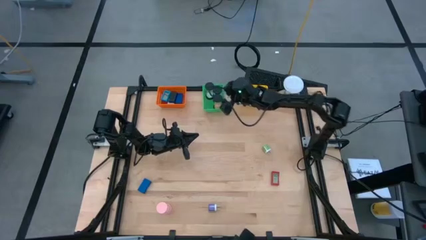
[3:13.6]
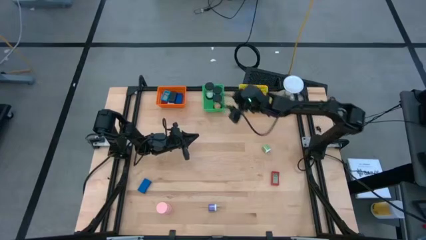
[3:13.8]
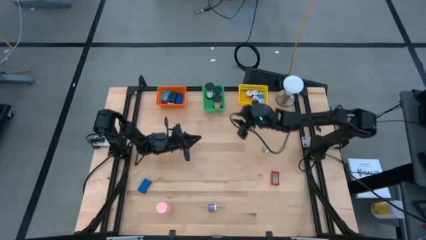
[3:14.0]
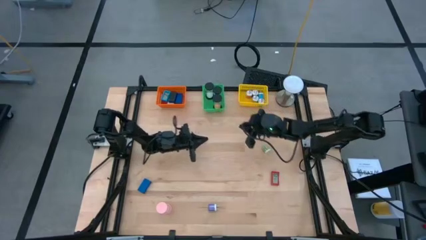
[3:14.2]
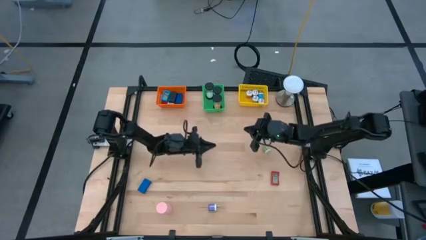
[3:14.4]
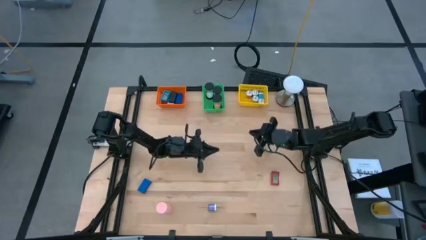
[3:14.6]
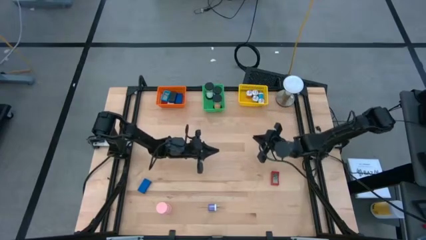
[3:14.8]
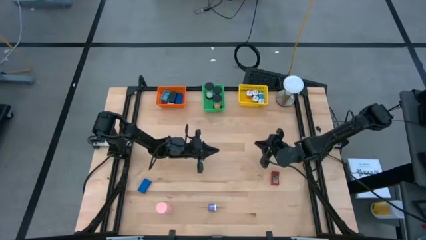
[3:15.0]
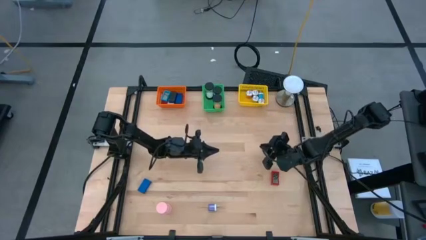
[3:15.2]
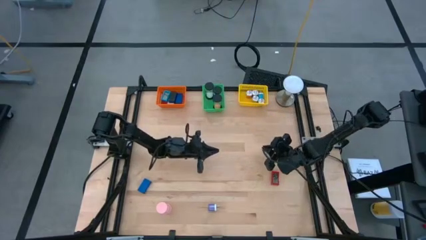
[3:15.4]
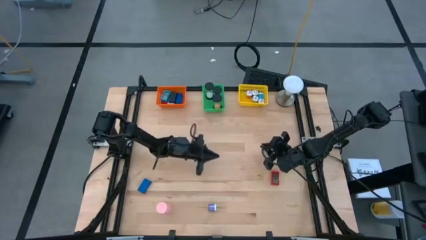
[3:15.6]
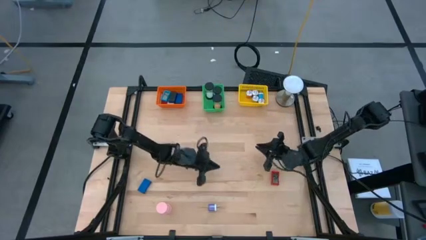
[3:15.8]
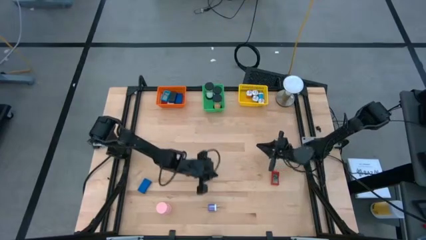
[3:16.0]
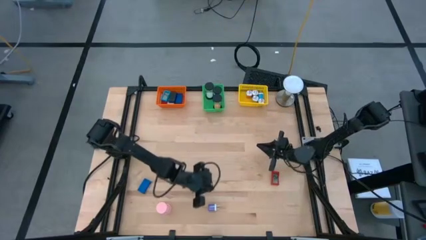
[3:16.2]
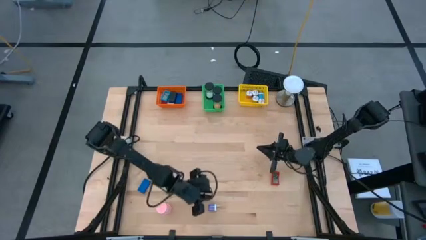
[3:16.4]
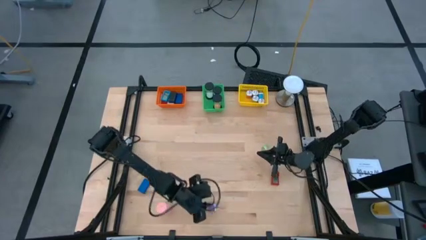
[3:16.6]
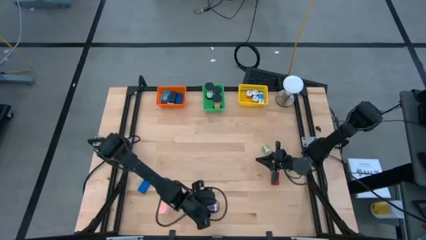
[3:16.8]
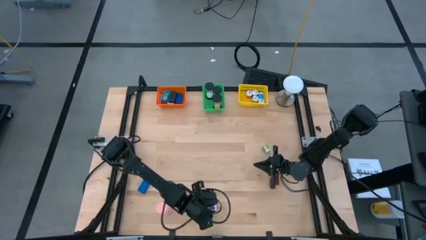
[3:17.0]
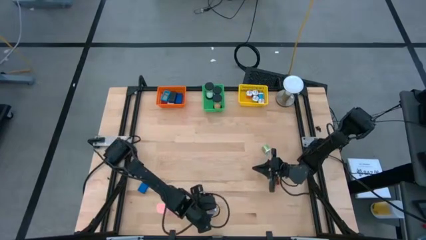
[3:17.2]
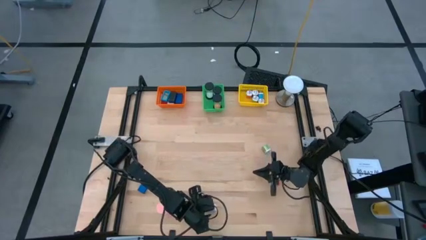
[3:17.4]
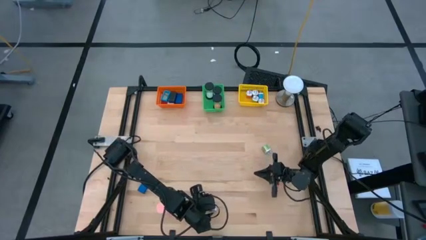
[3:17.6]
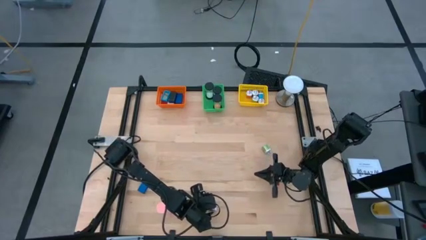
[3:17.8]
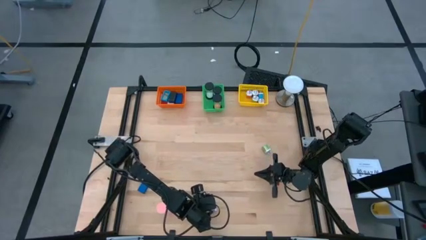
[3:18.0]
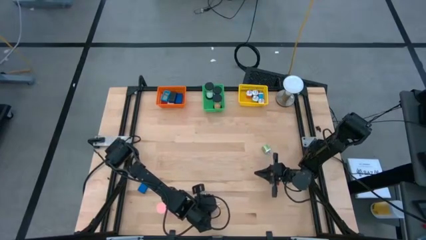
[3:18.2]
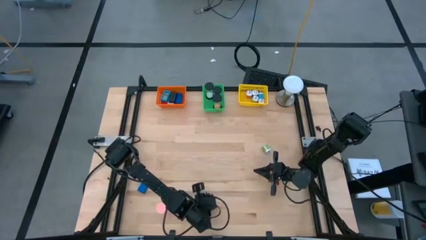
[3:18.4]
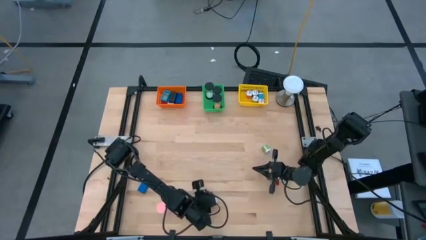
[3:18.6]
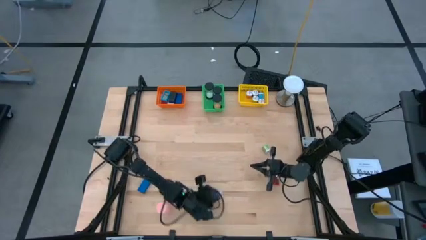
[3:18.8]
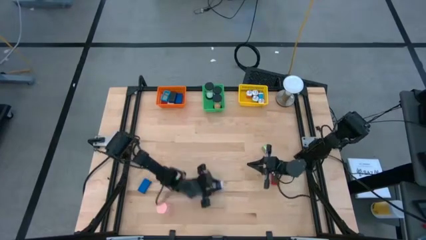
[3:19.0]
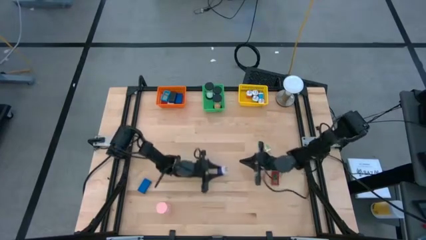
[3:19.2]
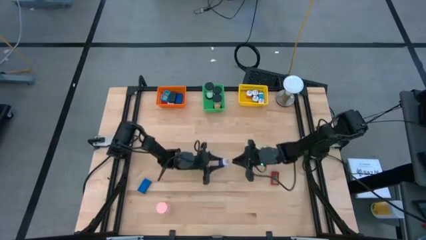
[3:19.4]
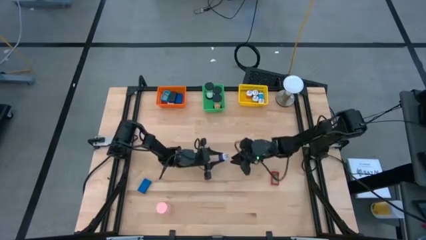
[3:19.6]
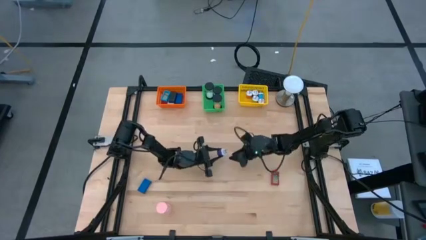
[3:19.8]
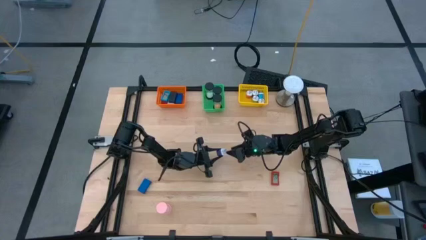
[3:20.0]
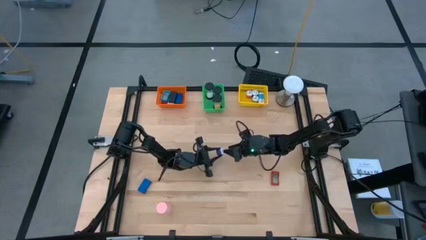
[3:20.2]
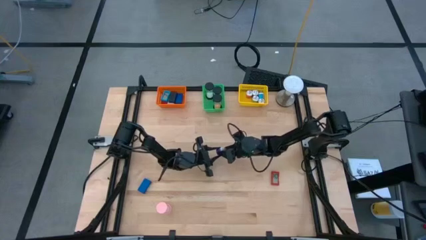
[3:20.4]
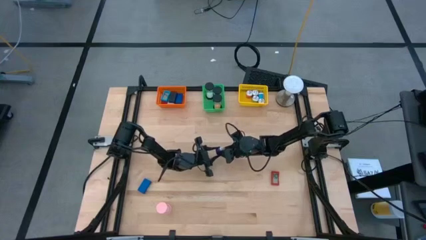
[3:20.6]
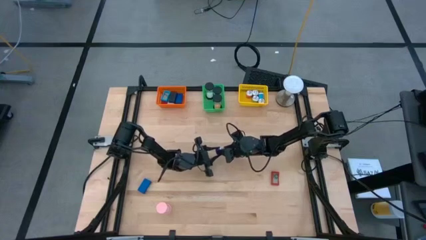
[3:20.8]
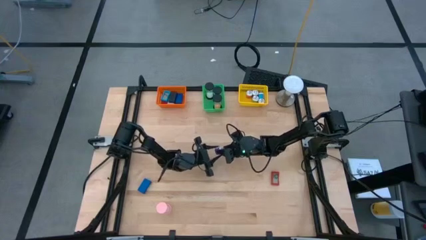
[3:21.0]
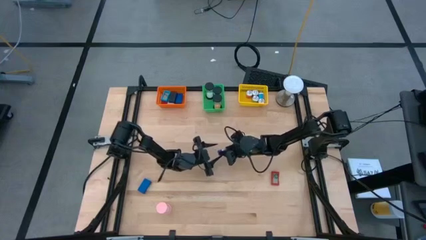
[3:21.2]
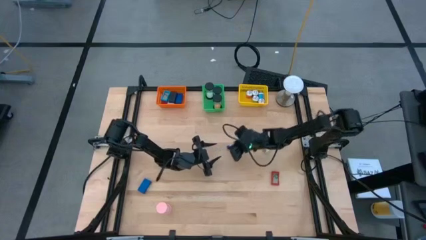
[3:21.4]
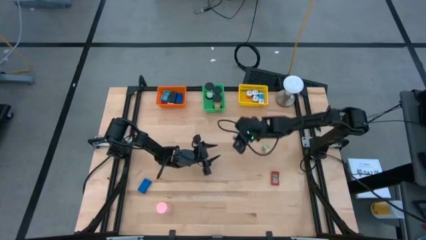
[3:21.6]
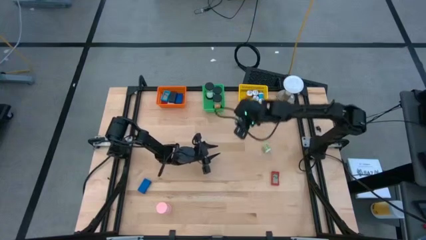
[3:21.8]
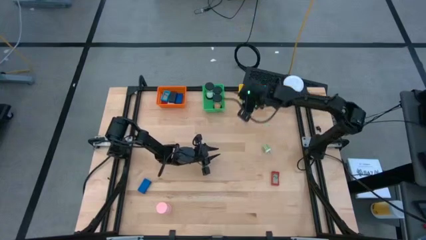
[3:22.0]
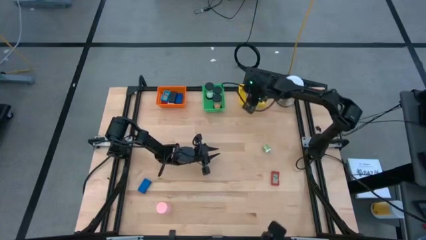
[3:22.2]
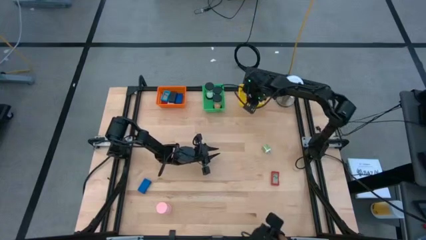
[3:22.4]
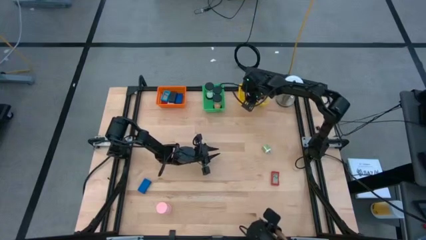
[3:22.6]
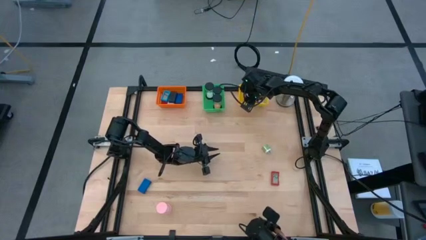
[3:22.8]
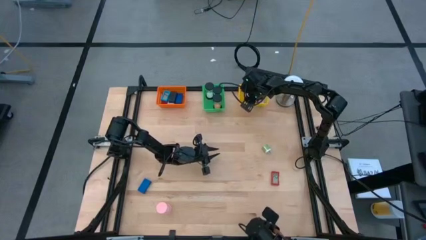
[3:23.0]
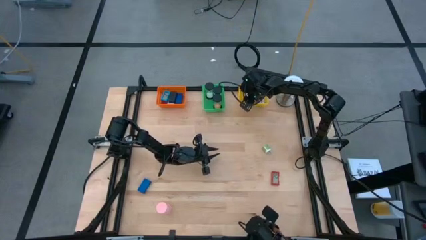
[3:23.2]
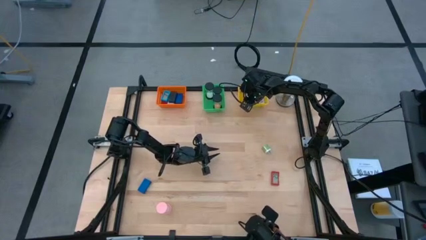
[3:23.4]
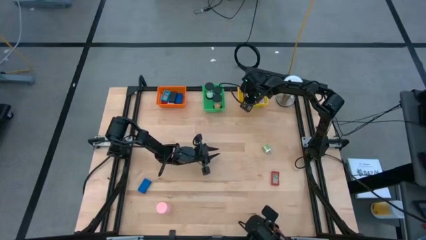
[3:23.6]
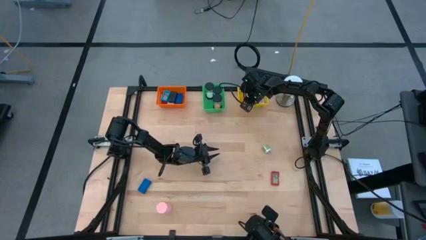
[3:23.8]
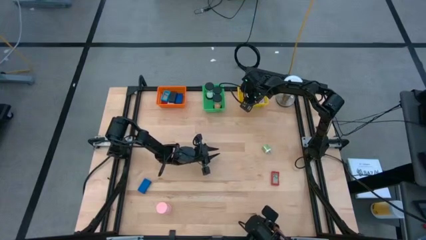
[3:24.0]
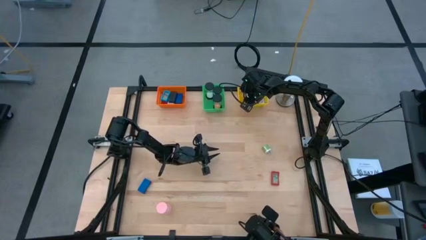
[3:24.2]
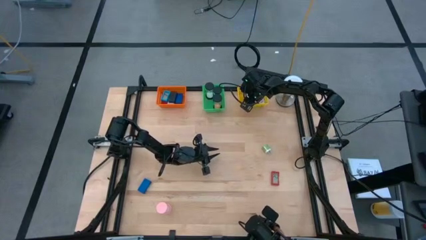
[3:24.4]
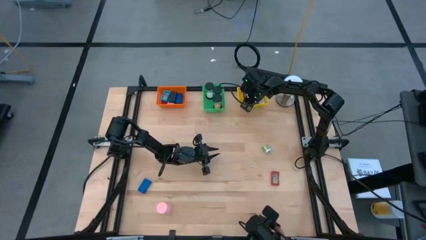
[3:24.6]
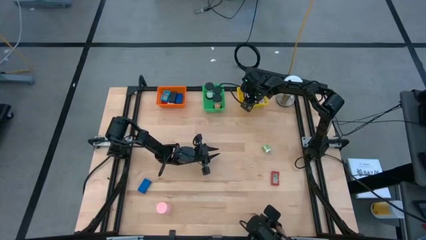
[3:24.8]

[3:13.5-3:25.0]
Task: Pick & Place Office items
Put the purple charger adapter into the yellow bin
